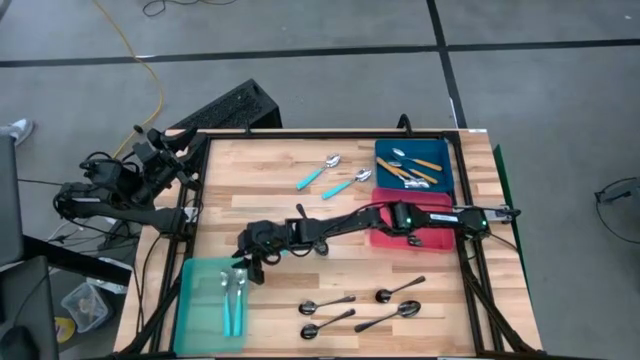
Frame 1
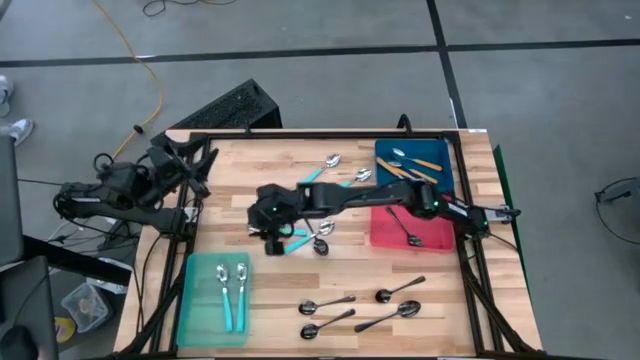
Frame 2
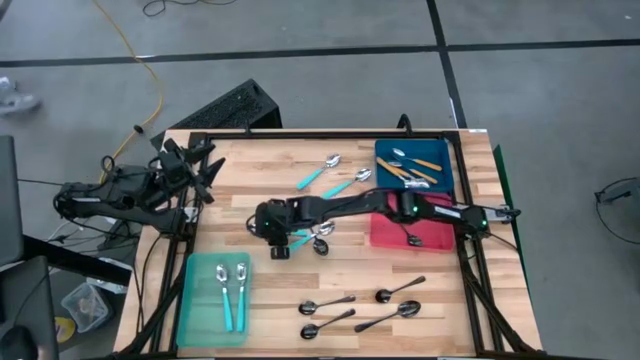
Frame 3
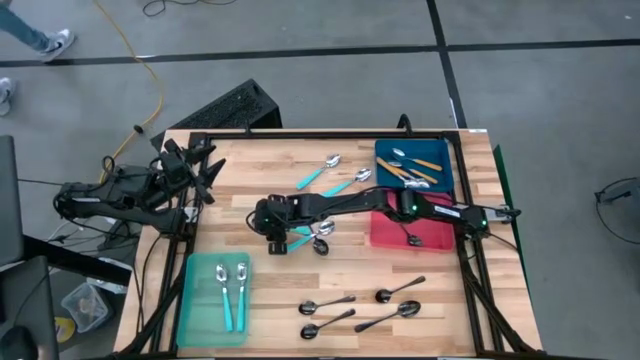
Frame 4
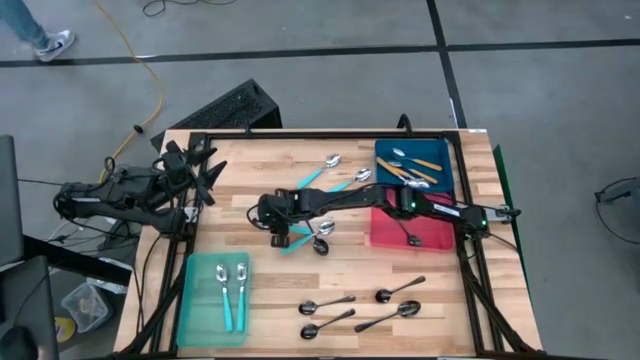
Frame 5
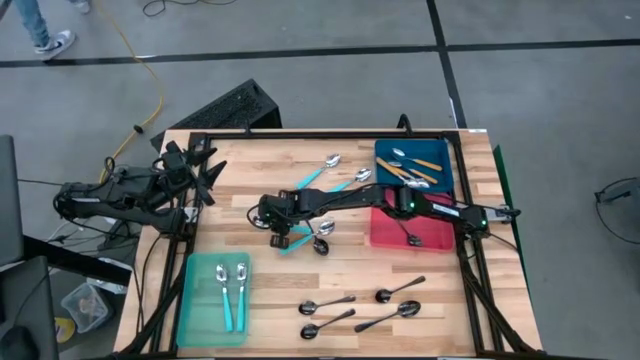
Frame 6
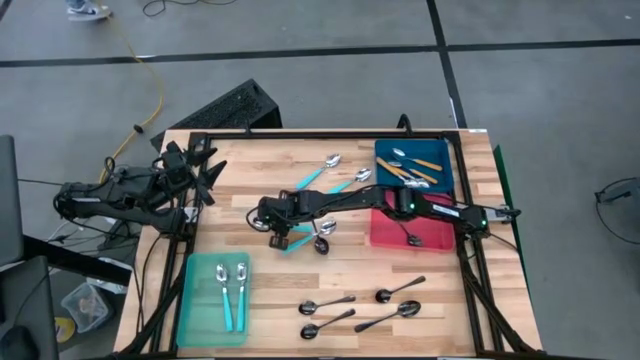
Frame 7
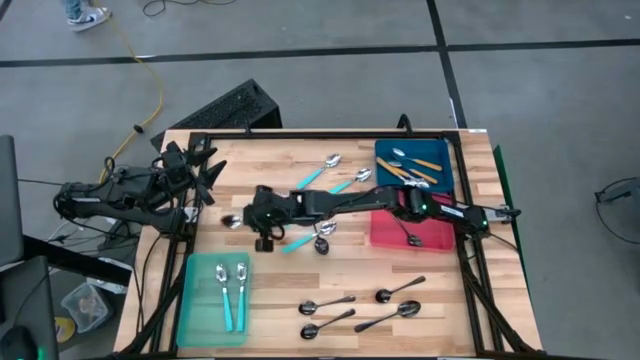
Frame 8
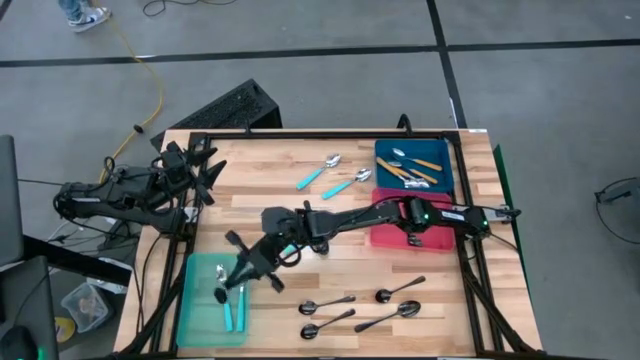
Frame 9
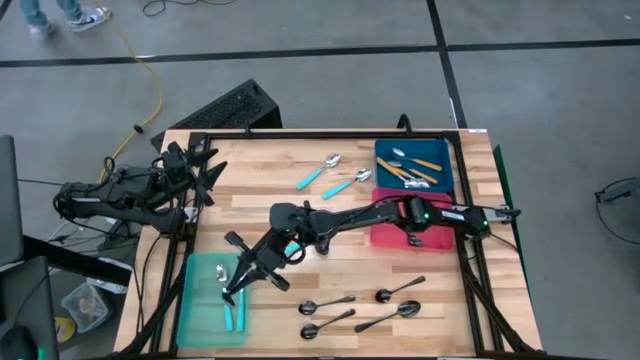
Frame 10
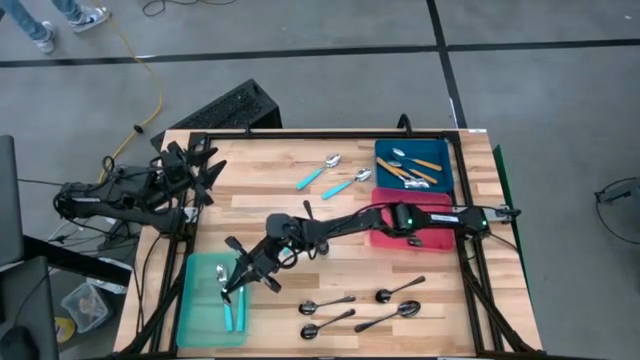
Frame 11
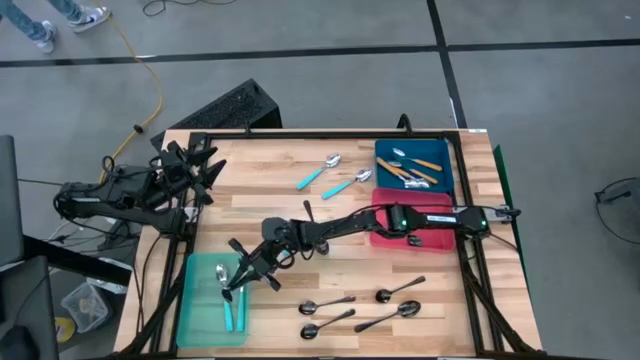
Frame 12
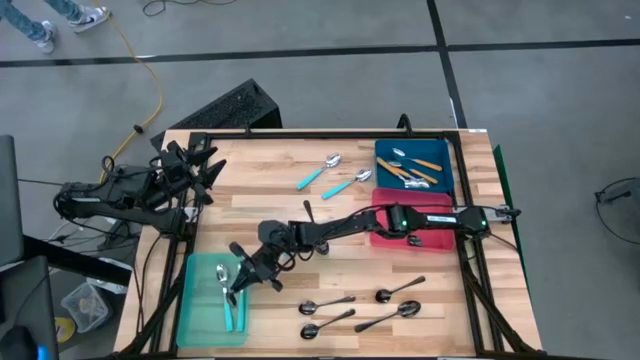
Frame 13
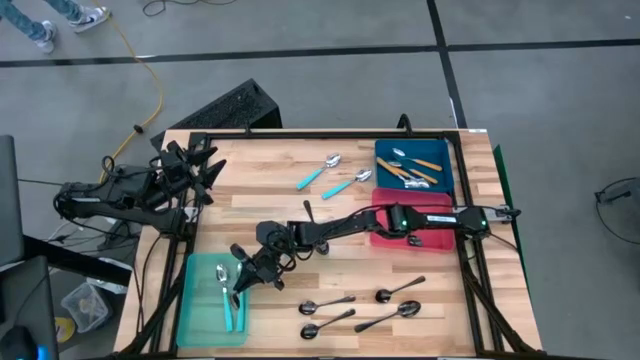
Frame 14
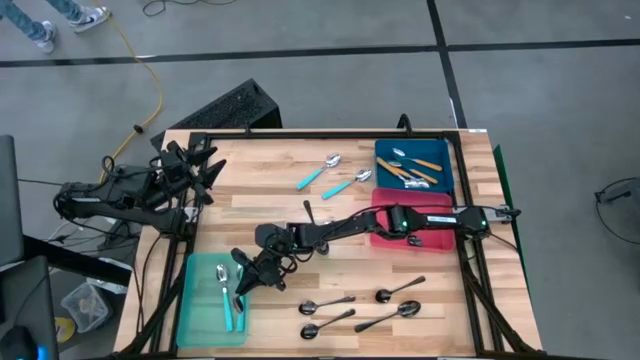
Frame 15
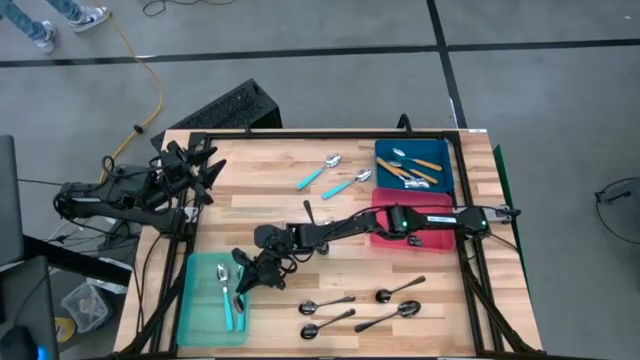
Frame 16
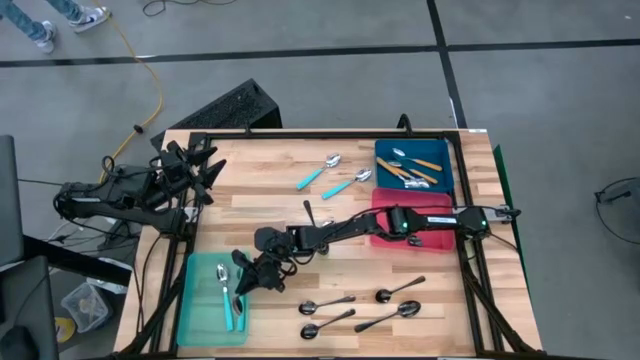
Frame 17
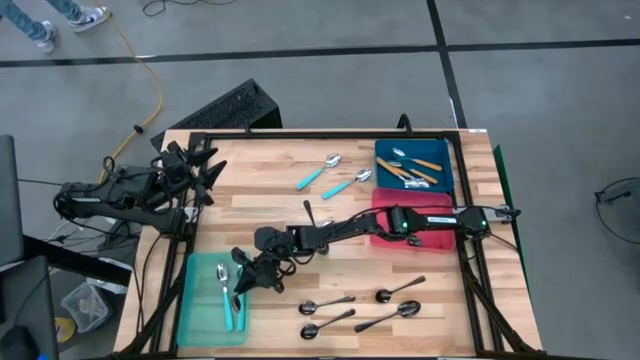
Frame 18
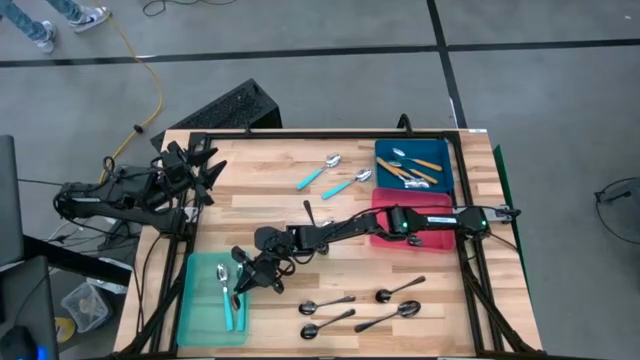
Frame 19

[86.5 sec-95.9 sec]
Task: Sort silverware by color (type)
Put the blue spoon into the skyblue bin

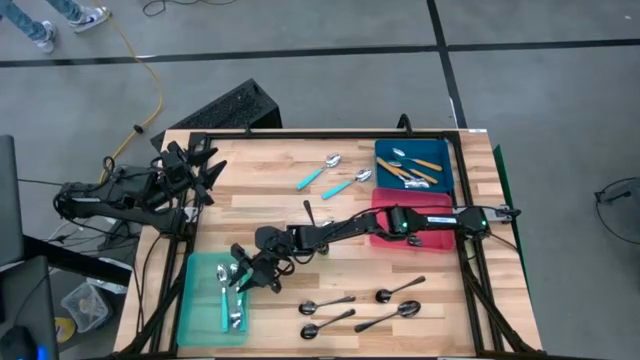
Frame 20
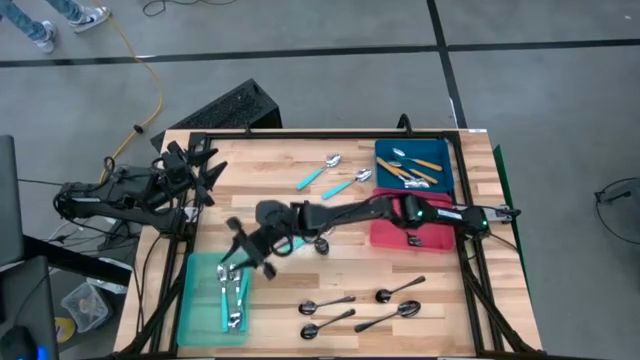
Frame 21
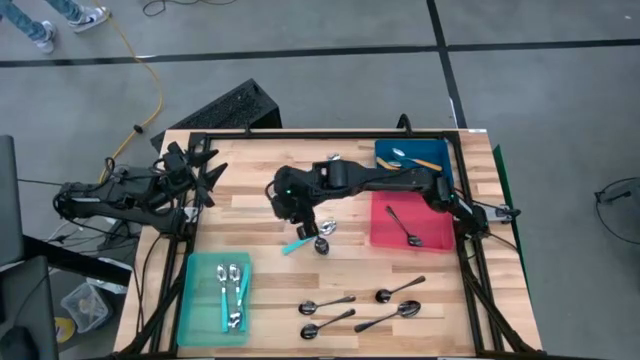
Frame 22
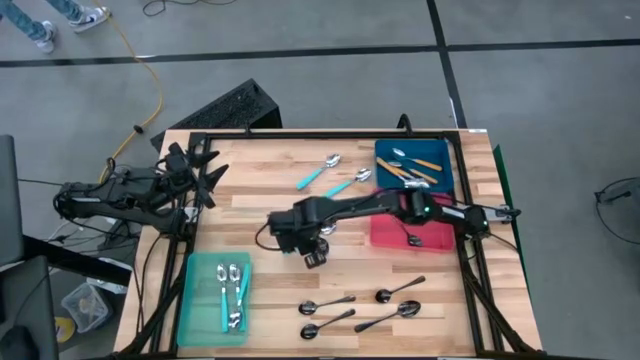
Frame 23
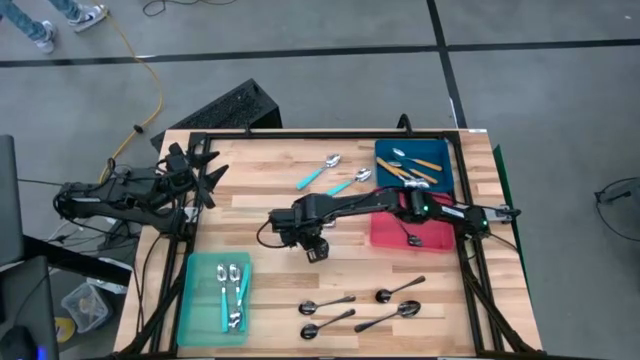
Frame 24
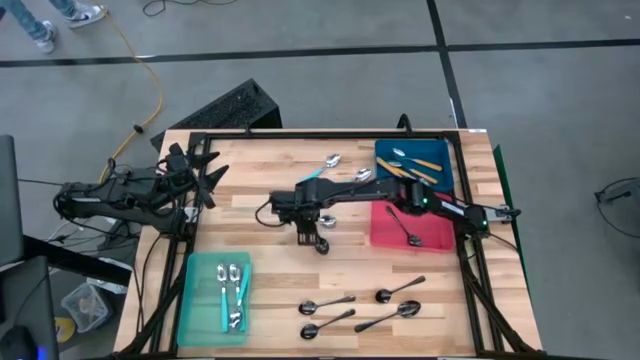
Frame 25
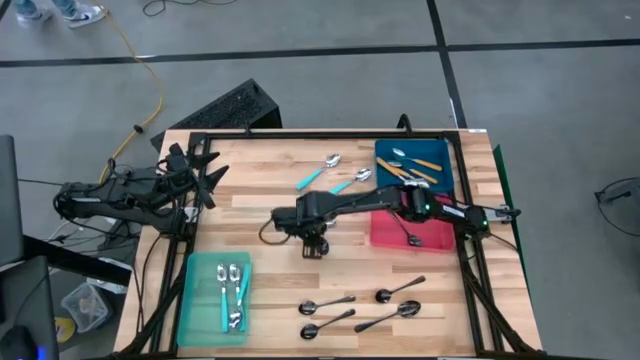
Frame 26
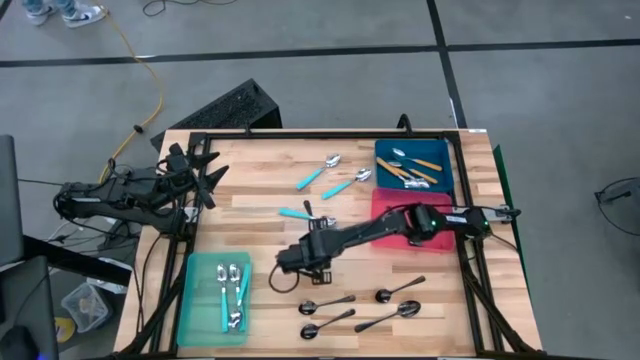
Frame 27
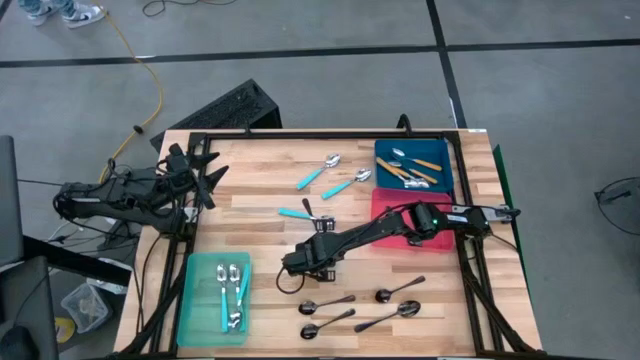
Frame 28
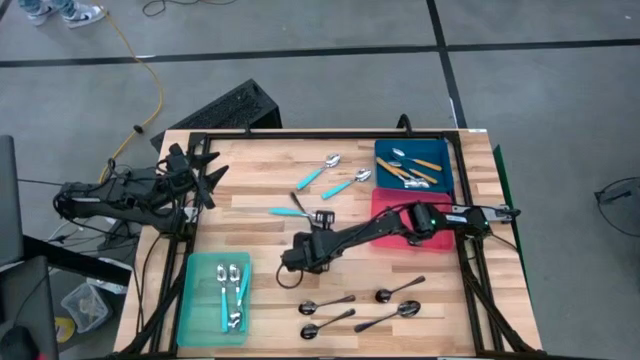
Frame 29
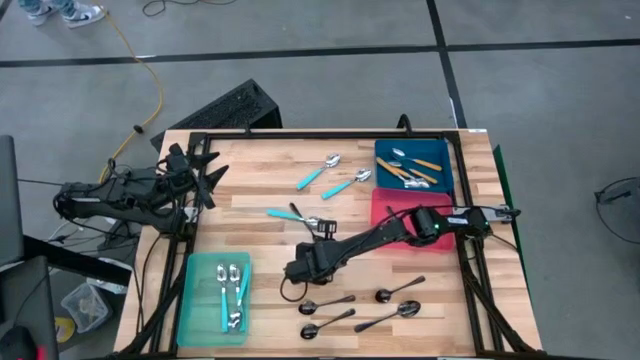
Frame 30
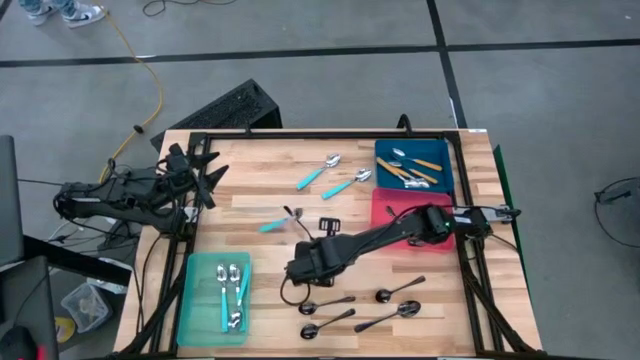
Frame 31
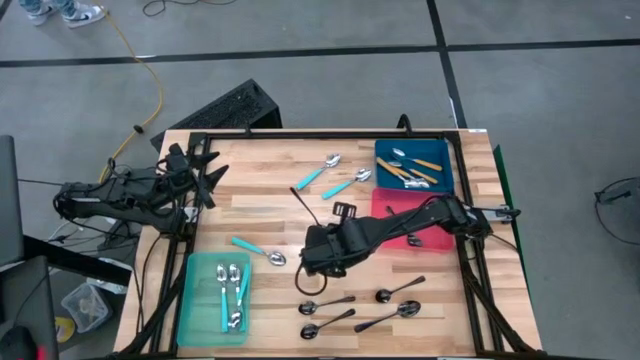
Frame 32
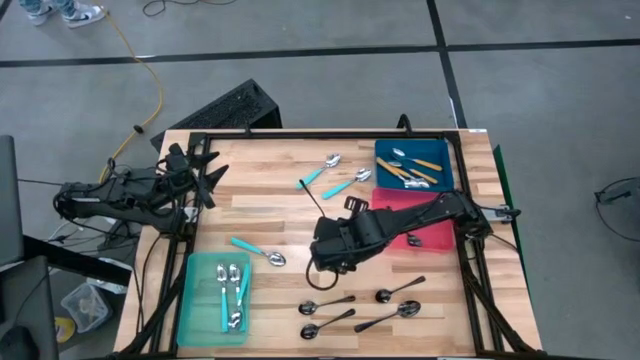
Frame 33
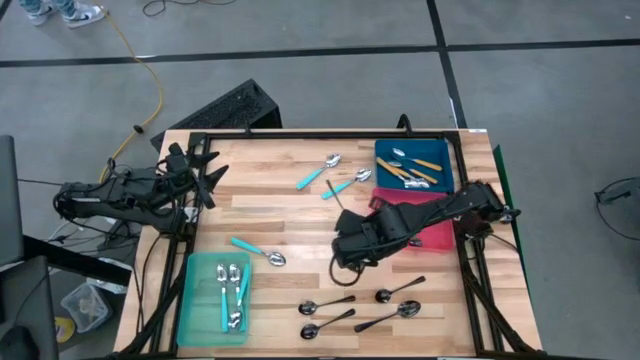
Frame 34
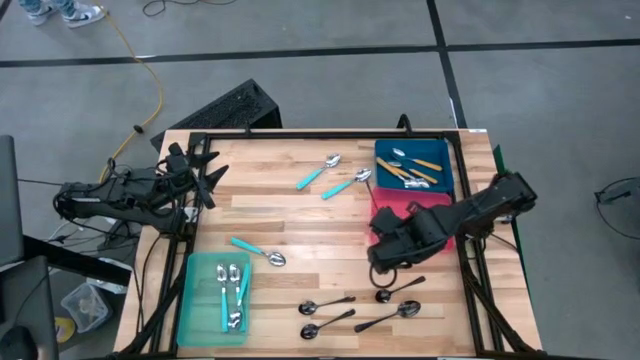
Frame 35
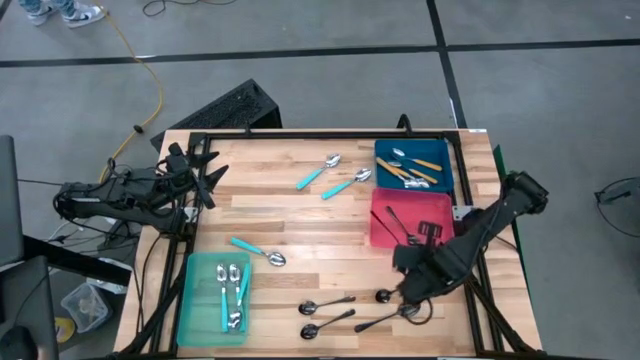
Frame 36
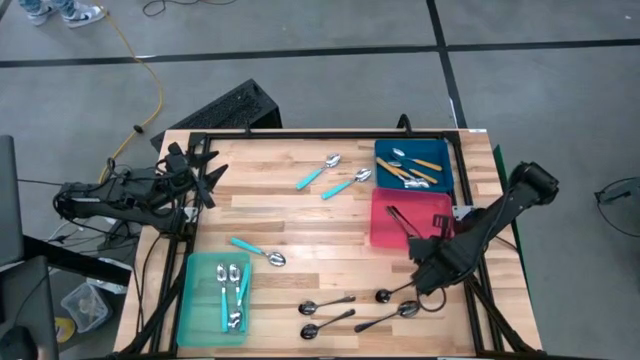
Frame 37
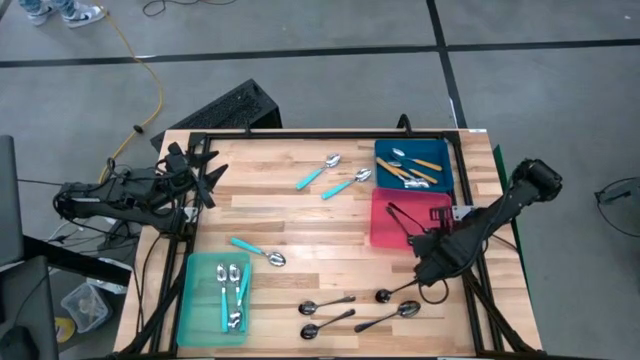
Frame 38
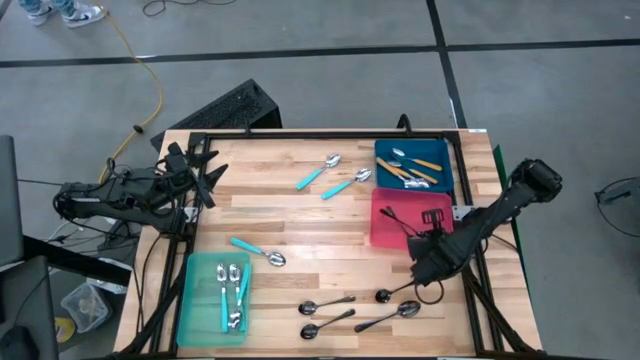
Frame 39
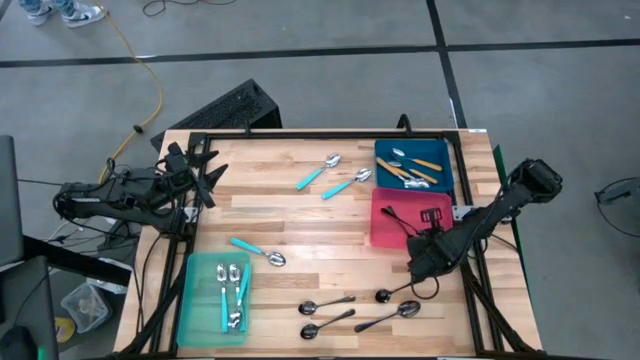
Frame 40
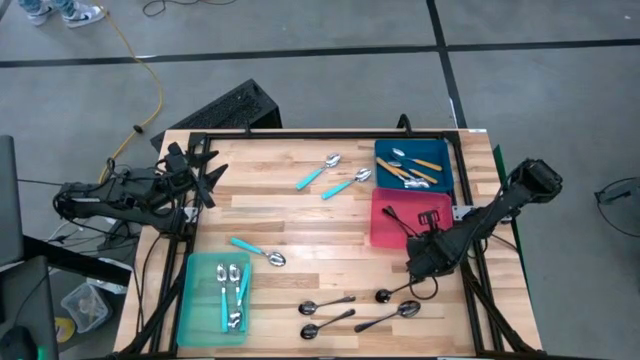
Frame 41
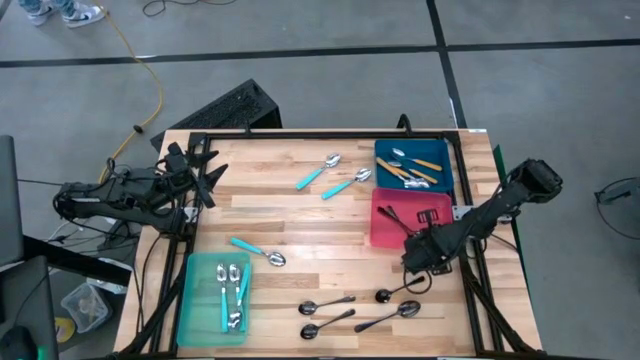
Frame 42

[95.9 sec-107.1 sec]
Put the black spoon into the red bin

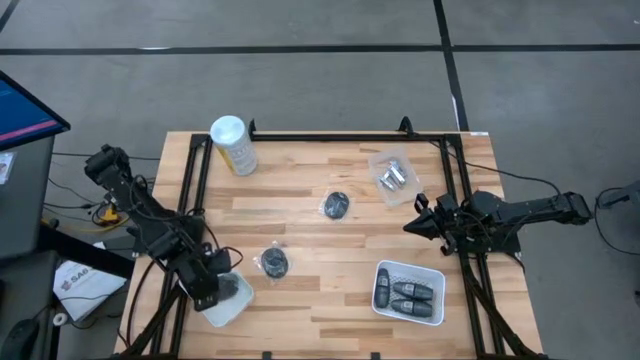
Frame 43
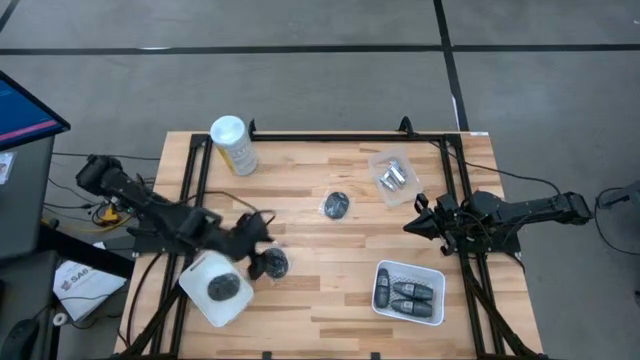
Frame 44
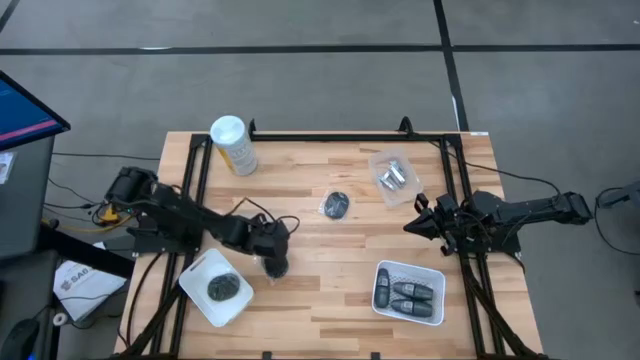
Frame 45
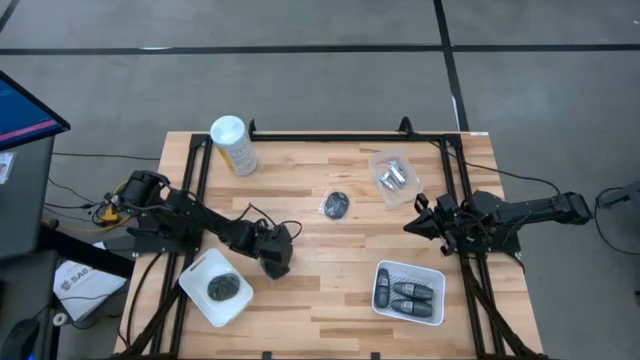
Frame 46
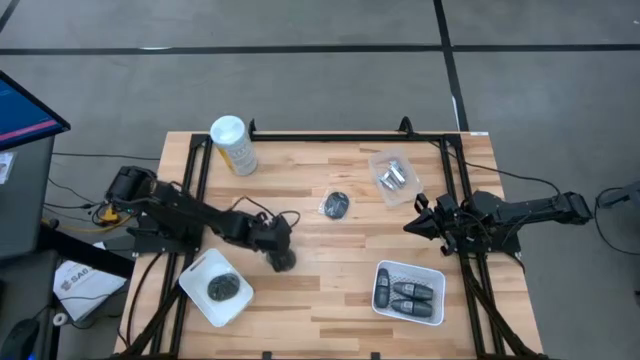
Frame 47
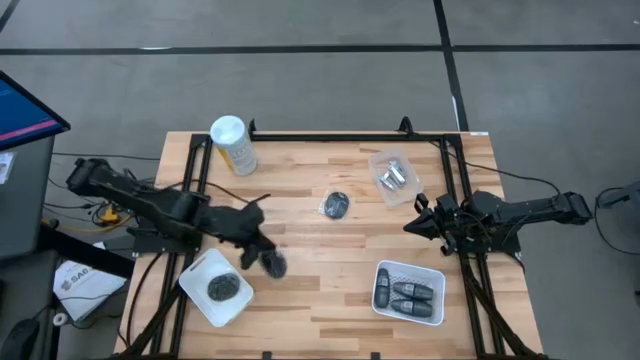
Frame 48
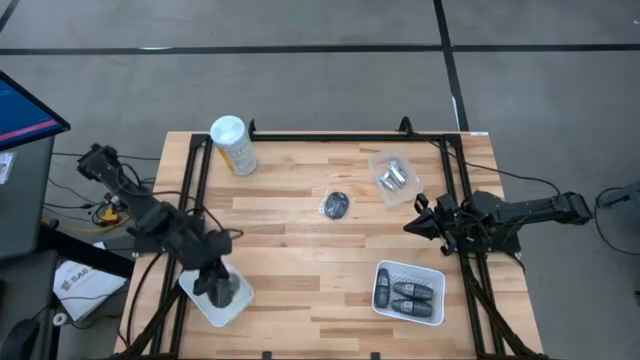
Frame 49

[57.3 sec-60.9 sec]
Task: Pick & Place Travel size toiletries
Put the black hairbrush into the left white bin
